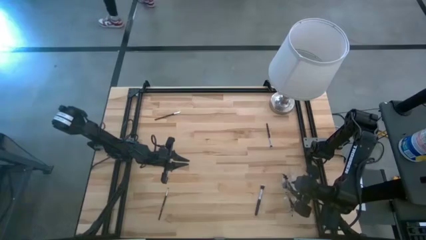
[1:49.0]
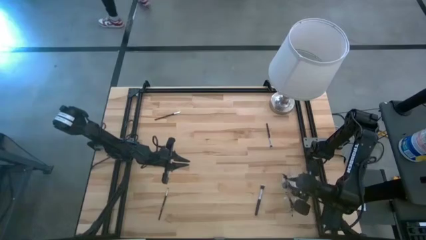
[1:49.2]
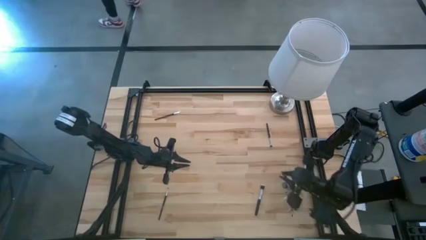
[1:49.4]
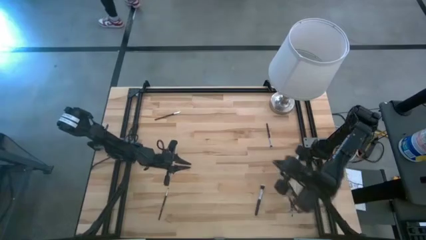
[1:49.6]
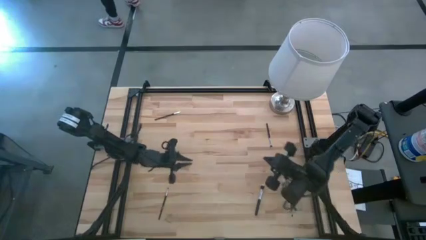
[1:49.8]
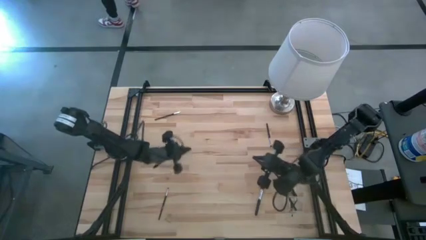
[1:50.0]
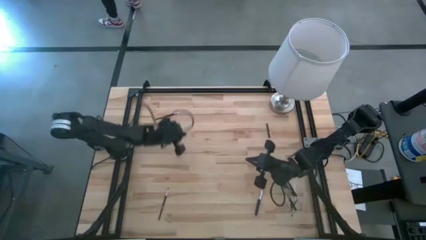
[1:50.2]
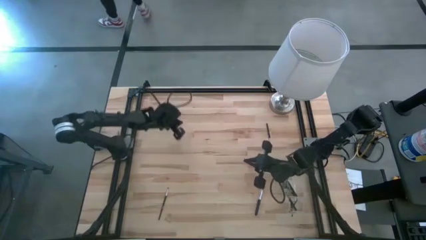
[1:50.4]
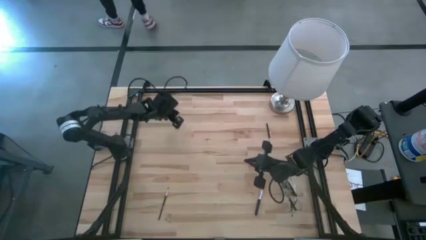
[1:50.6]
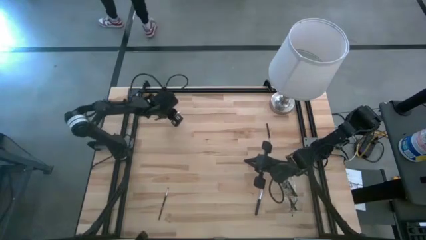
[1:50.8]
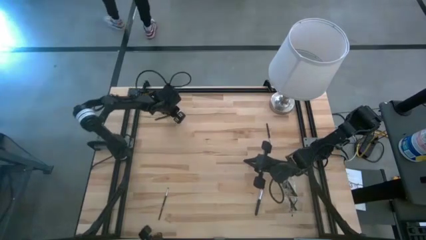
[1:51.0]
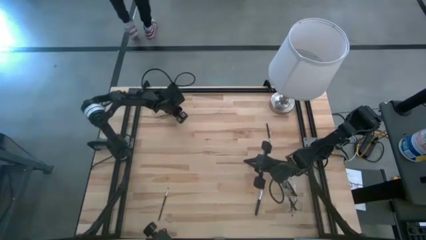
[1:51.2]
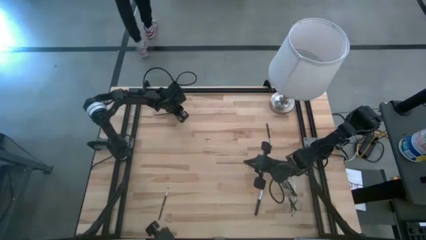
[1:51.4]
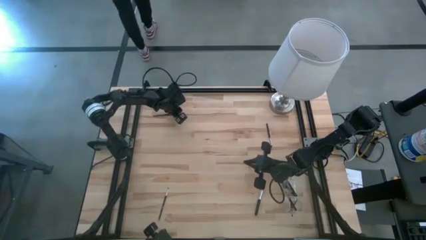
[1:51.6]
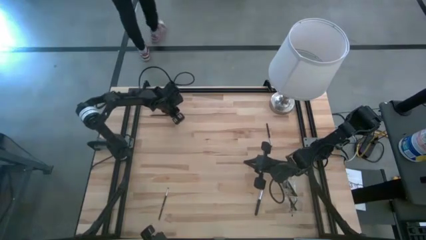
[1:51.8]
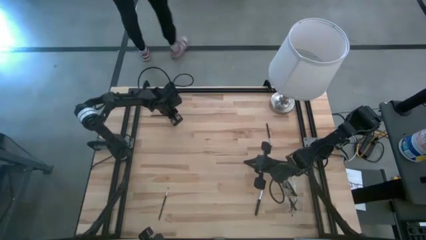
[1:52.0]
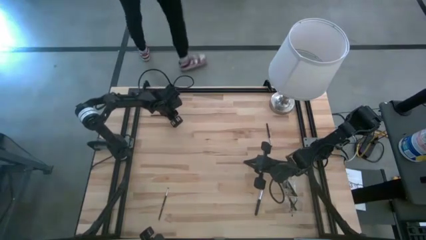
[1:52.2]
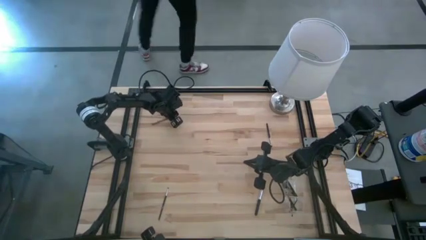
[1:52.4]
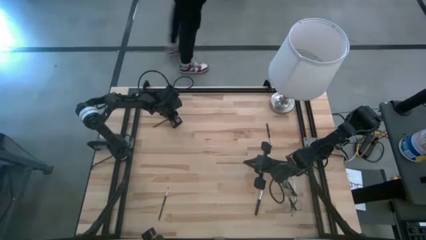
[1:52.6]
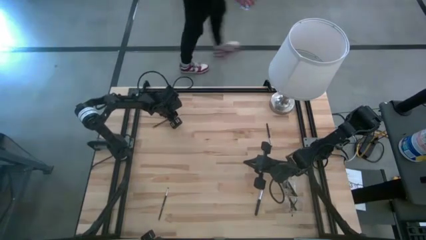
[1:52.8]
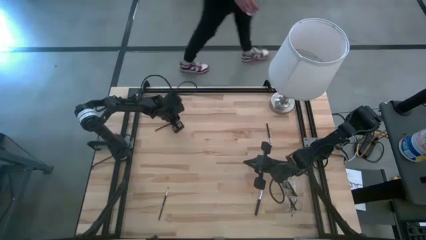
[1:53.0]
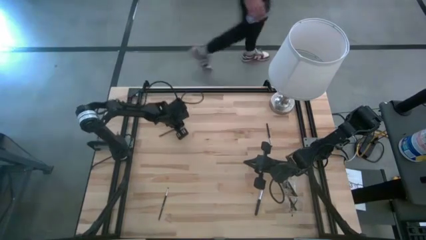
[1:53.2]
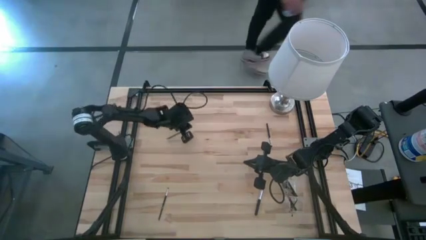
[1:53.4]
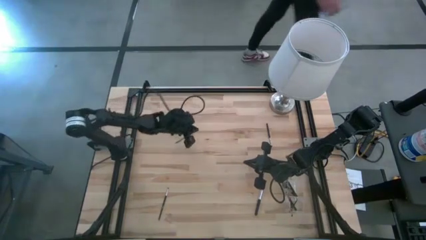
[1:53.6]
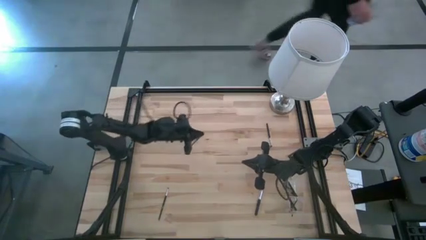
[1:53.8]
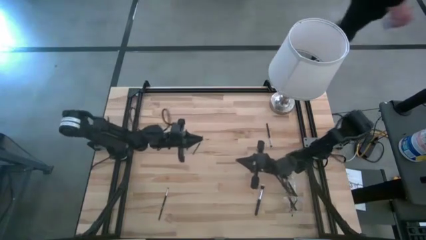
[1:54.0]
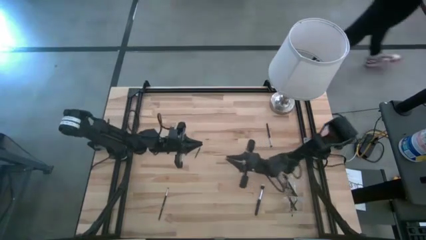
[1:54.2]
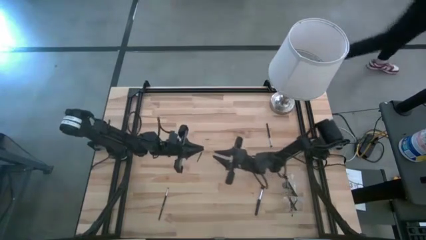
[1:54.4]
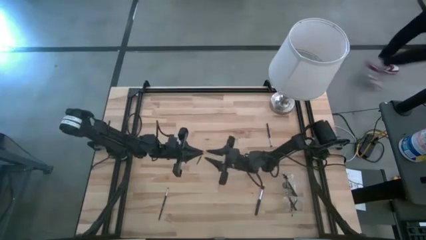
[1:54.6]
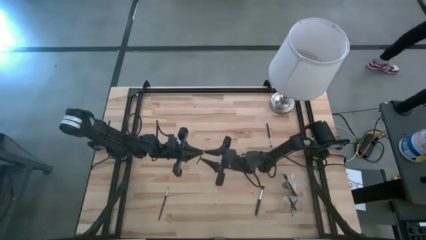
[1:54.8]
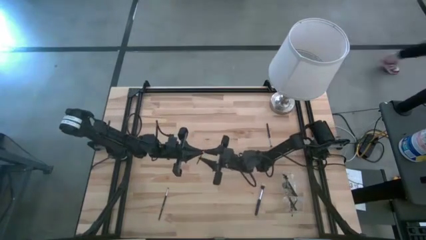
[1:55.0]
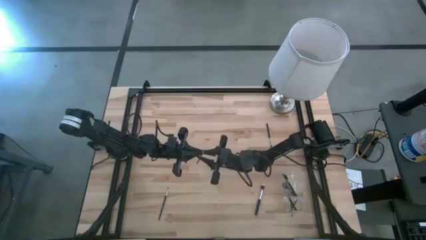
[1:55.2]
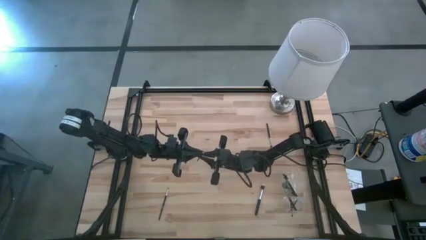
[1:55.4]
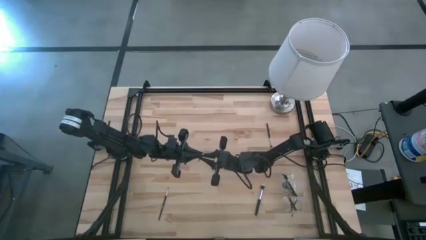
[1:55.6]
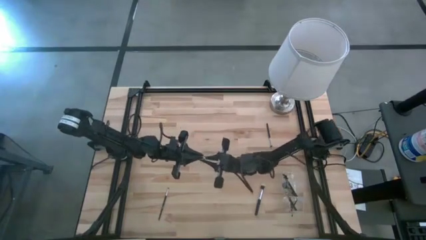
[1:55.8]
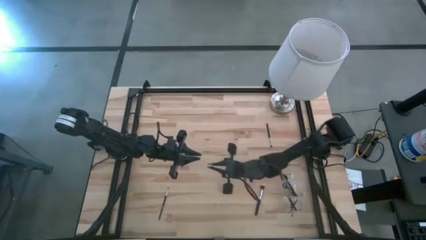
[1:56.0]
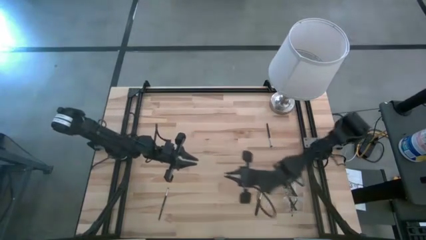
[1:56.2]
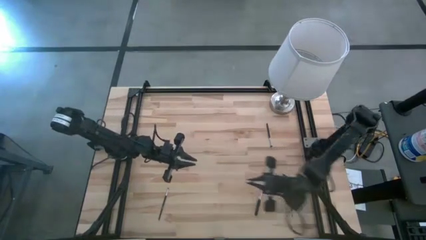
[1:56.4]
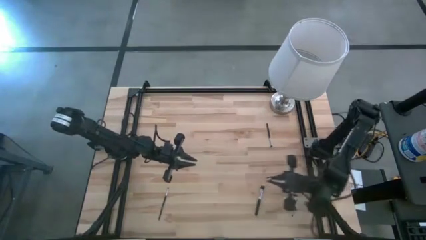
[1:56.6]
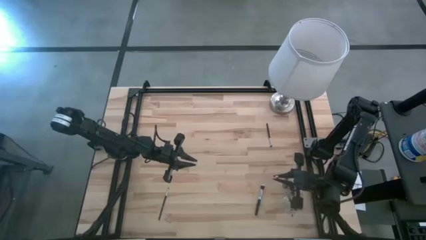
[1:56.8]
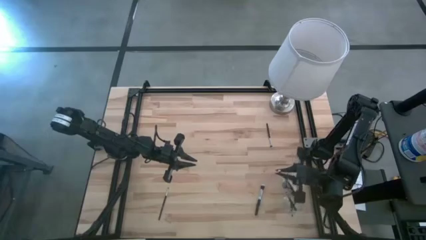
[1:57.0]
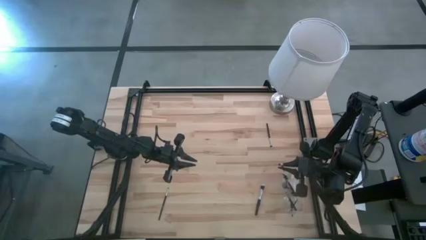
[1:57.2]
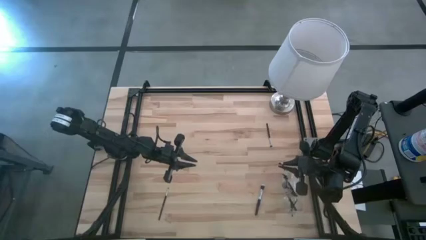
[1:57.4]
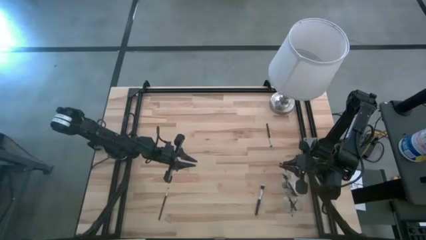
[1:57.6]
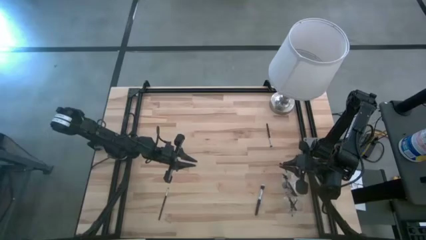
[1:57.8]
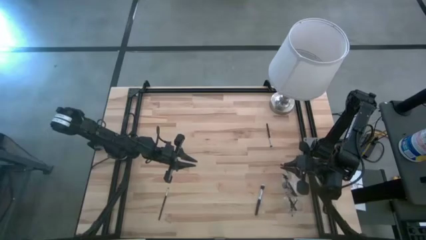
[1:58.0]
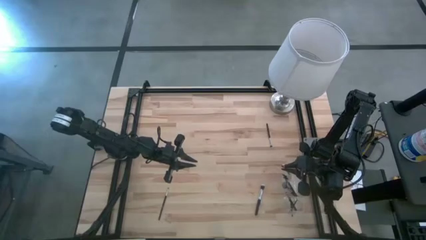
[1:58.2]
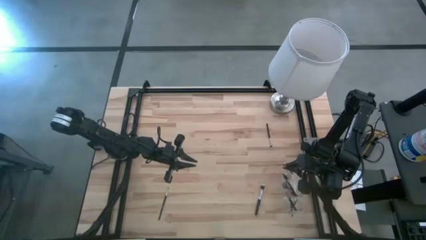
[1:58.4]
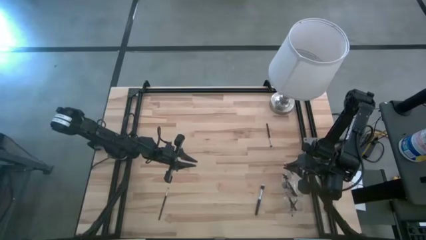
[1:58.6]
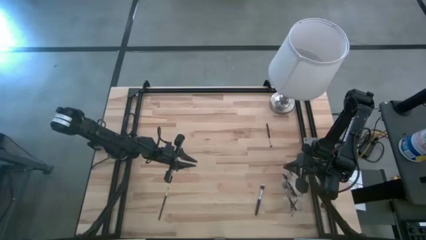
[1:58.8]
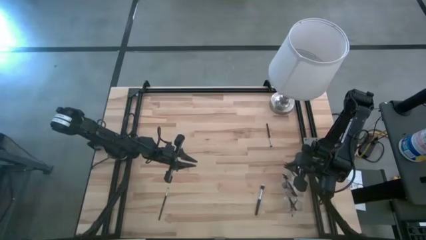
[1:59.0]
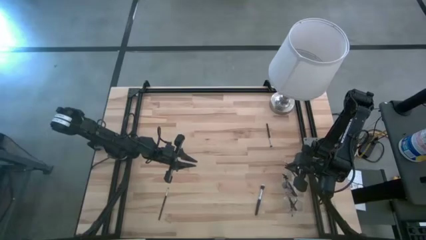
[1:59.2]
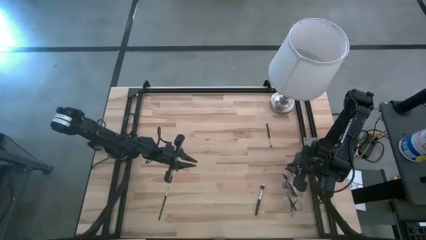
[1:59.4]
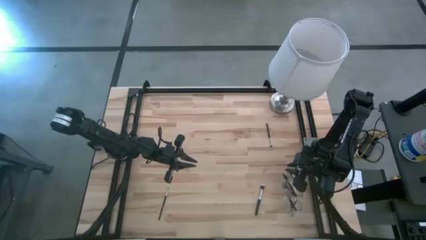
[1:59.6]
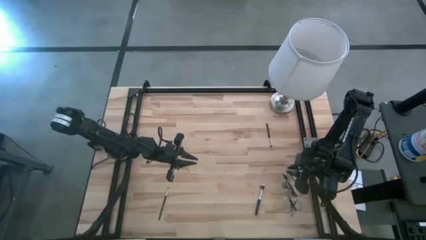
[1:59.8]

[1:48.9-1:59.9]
Task: Put items in baskets/containers
Put the eyebrow brush into the transparent organizer
